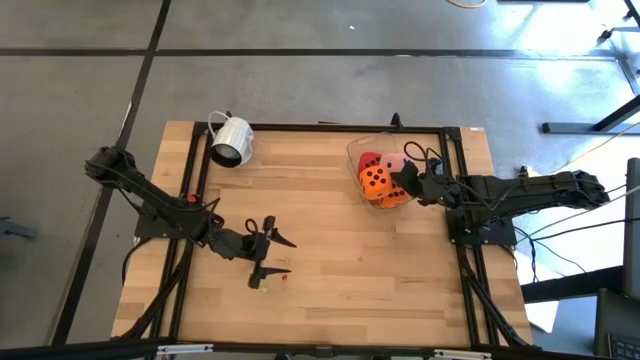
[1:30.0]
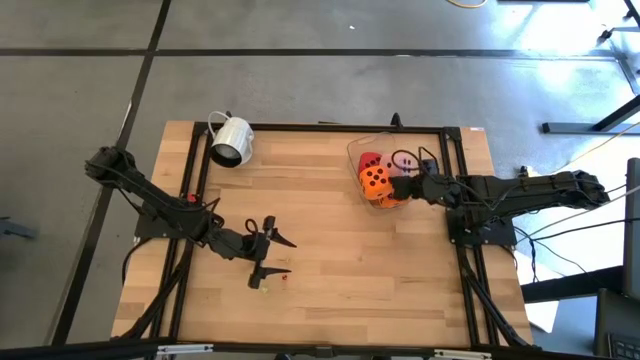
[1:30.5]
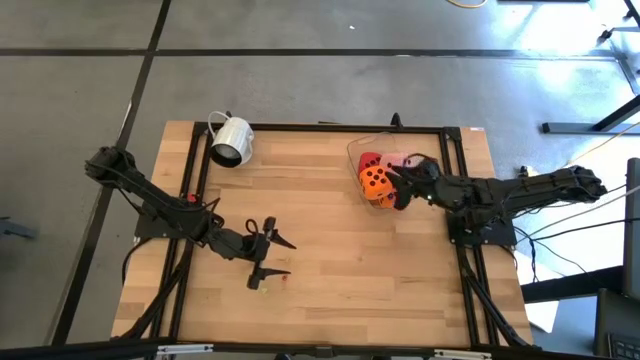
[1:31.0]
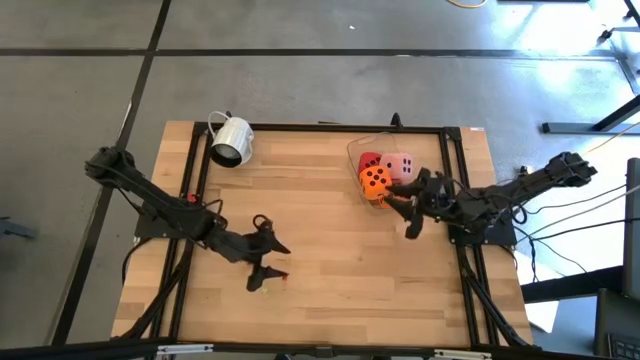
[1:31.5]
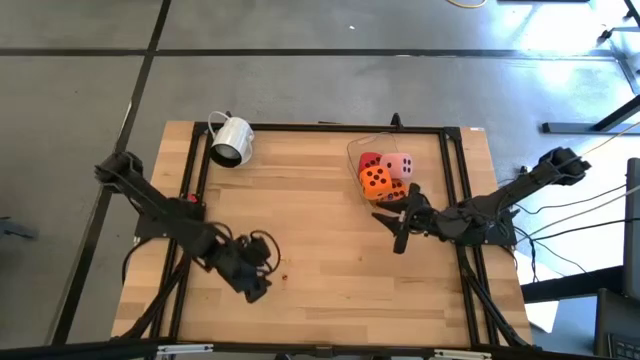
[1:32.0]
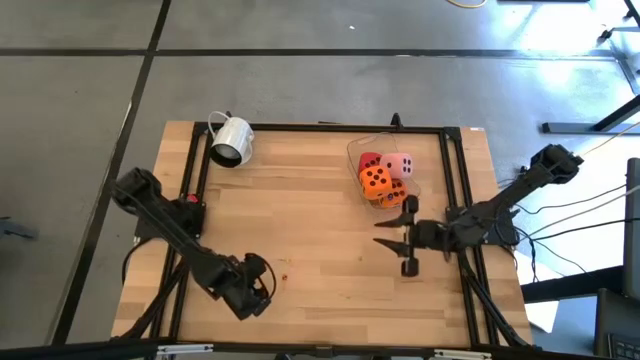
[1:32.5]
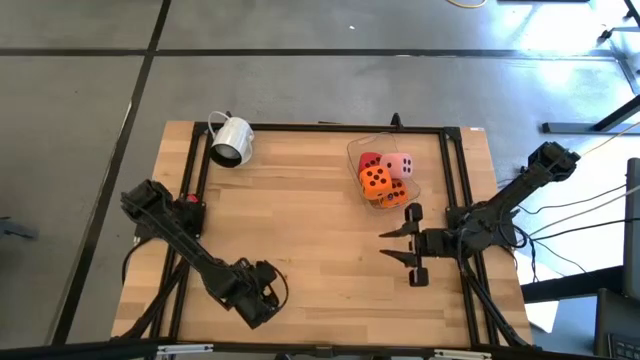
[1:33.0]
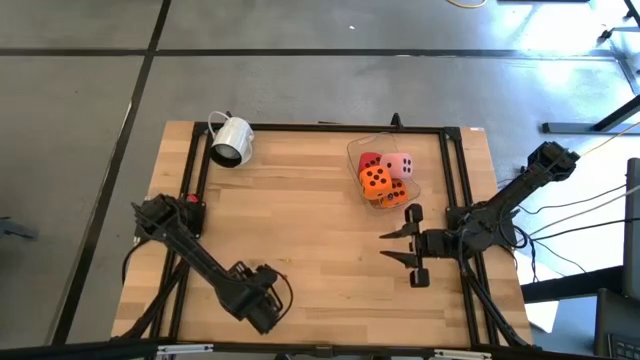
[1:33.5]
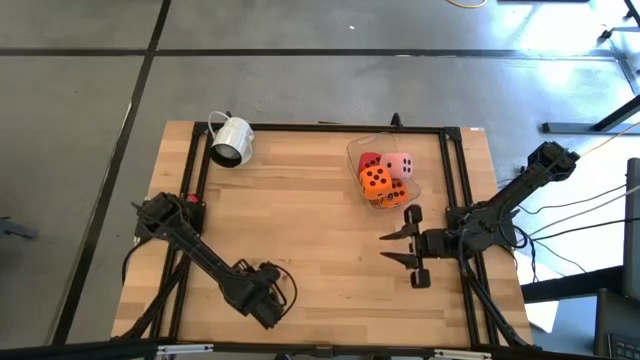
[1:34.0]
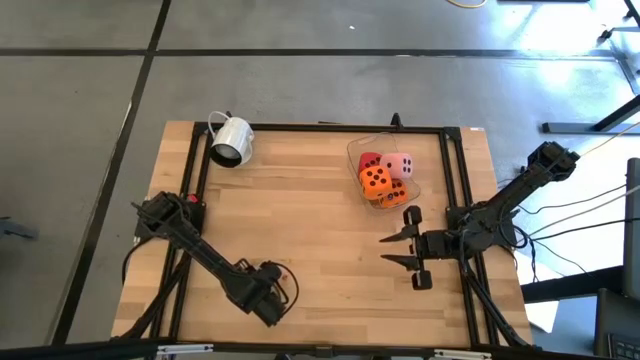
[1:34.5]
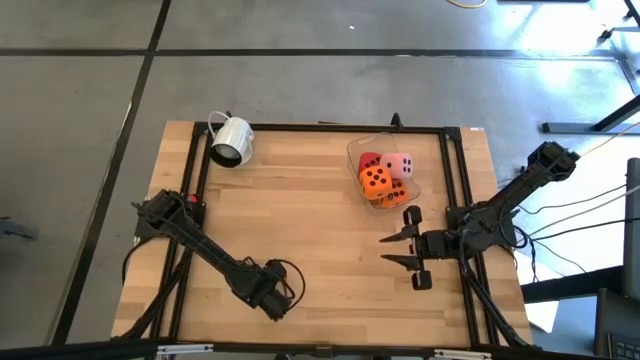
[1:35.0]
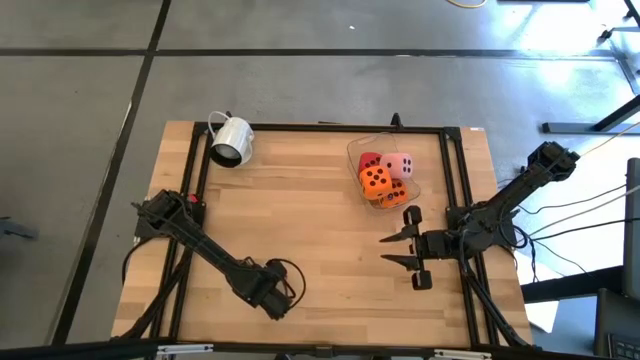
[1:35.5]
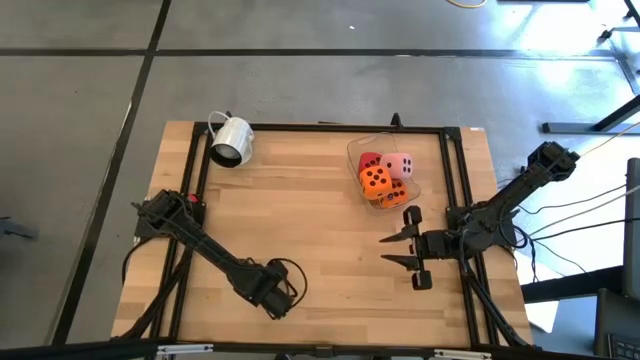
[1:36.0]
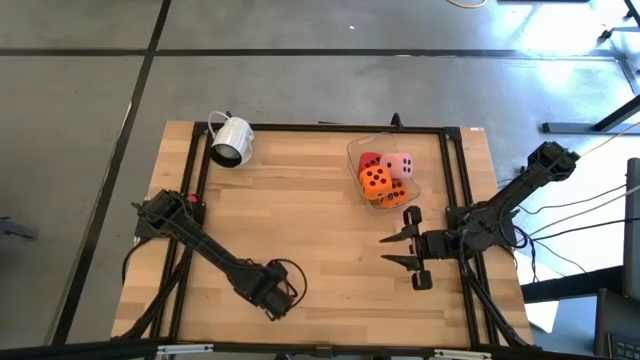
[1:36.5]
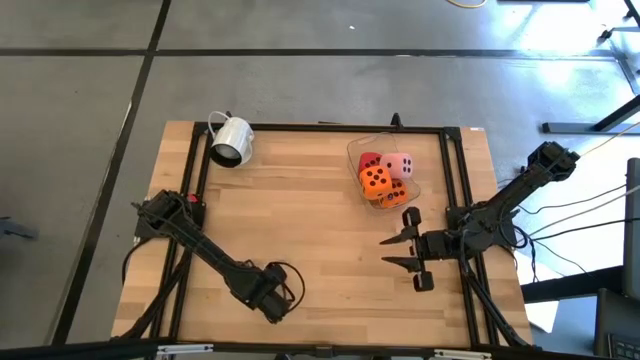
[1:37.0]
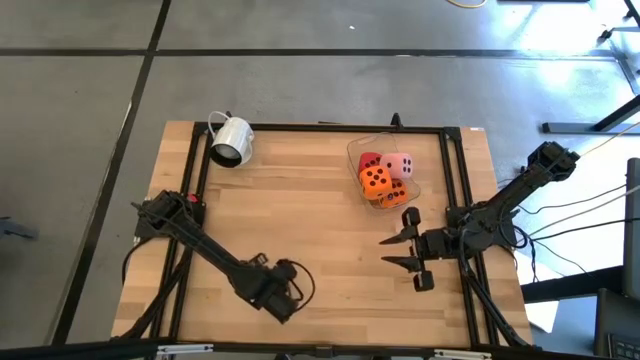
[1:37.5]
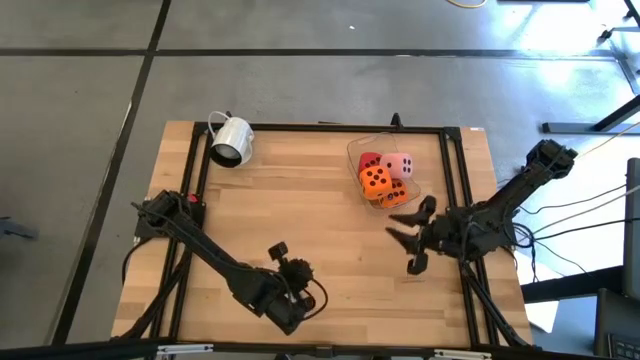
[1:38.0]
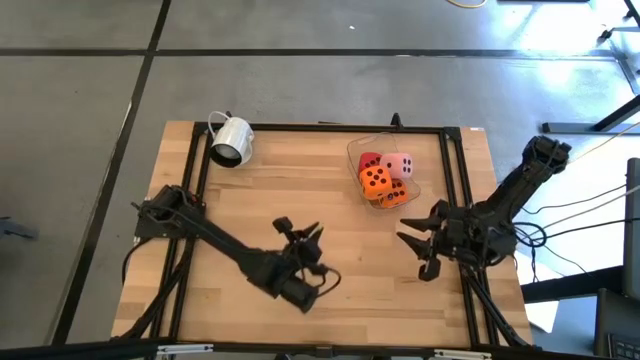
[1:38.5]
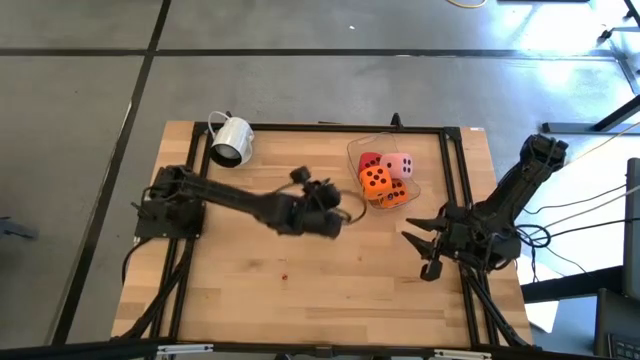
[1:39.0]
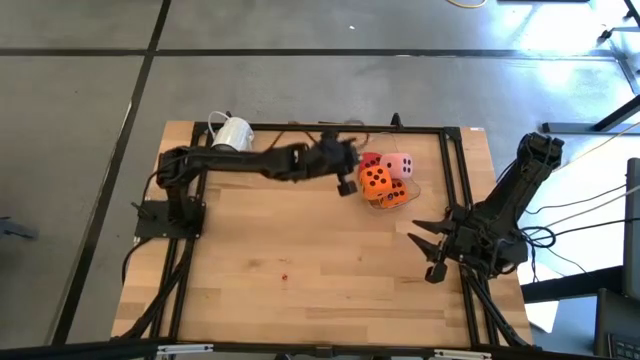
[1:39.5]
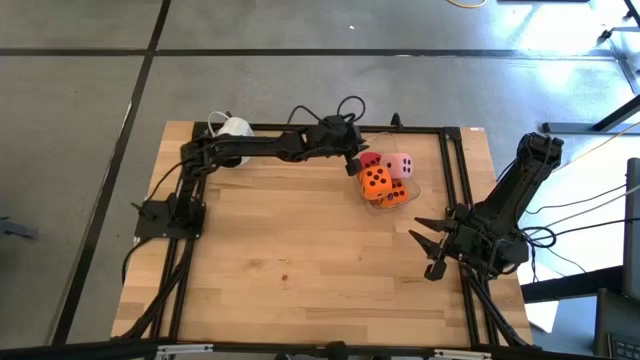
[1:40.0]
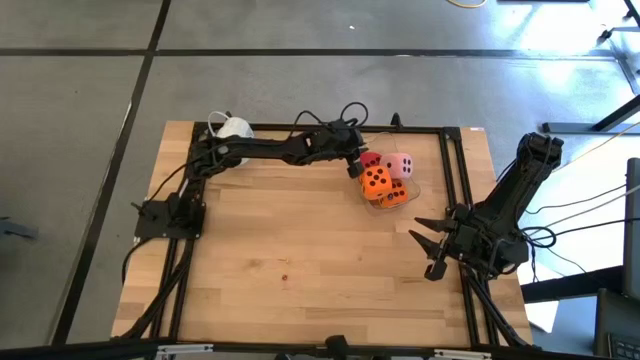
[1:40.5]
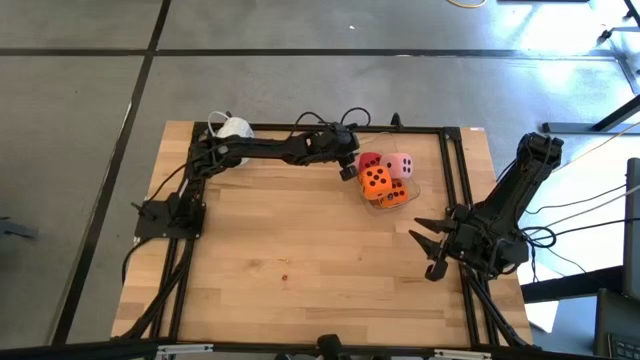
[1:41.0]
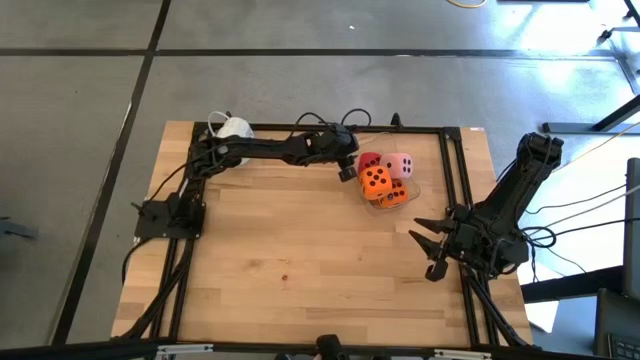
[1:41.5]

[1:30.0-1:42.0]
Task: Pick & Place Dice
Put the small green die in the bin

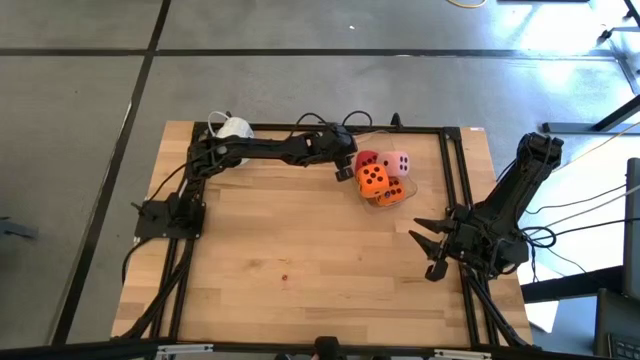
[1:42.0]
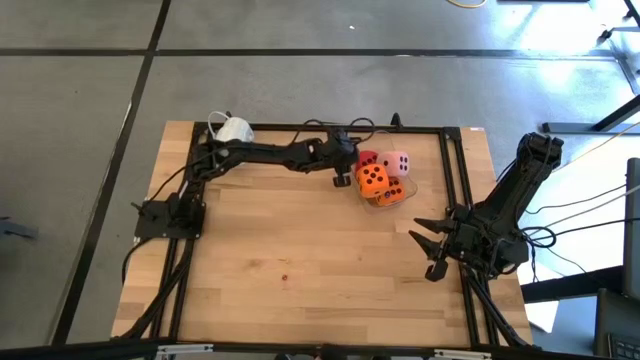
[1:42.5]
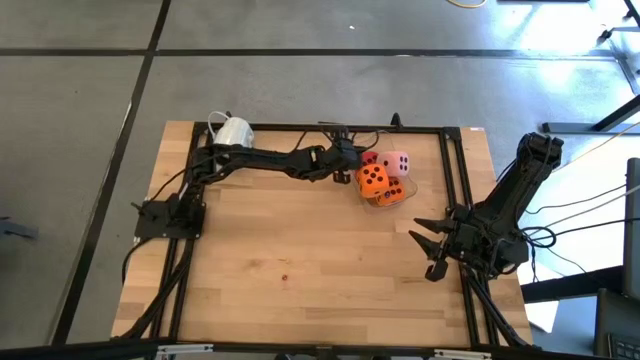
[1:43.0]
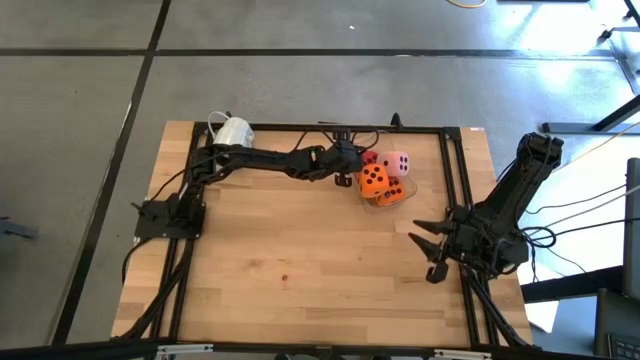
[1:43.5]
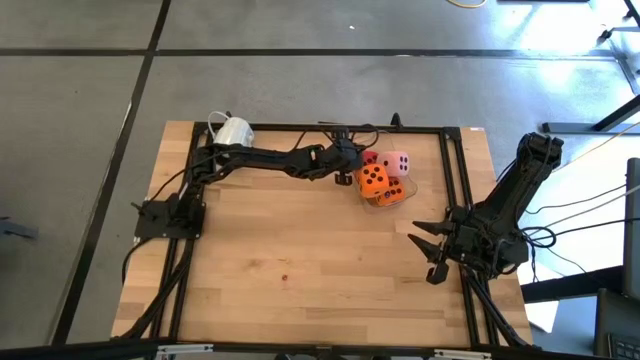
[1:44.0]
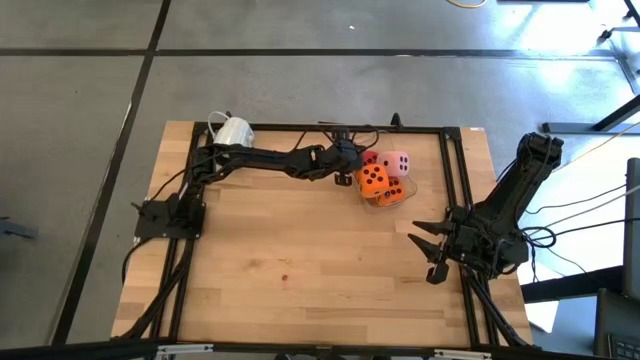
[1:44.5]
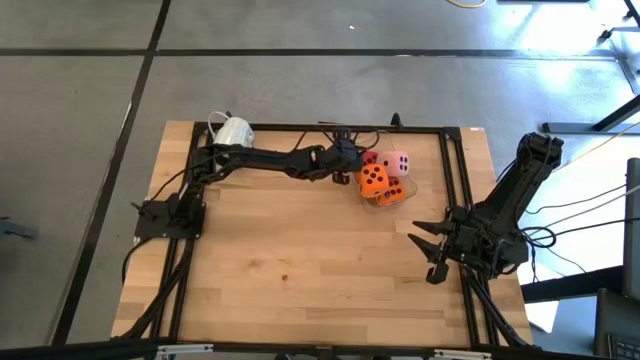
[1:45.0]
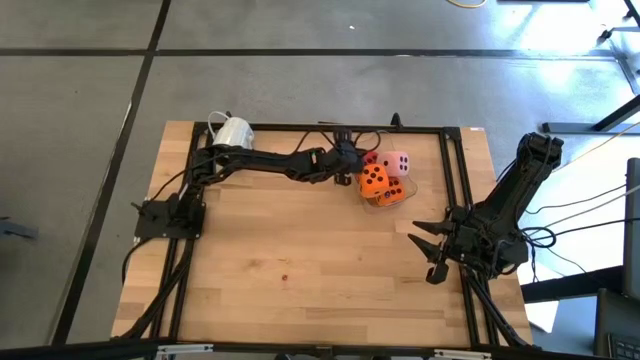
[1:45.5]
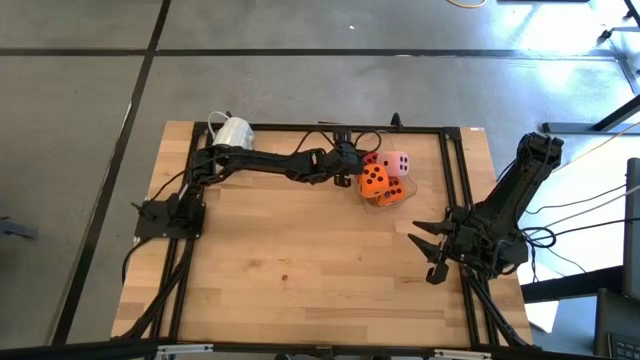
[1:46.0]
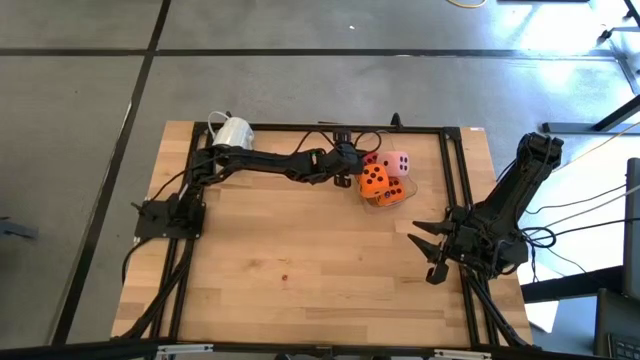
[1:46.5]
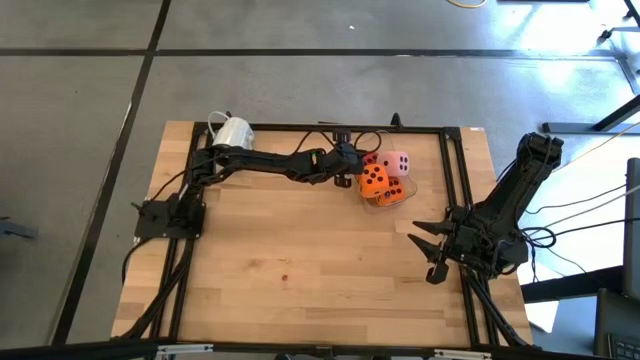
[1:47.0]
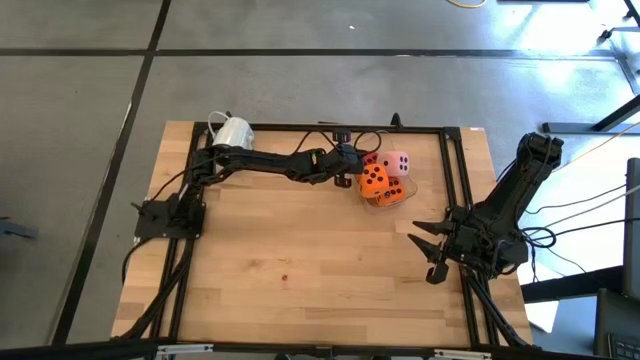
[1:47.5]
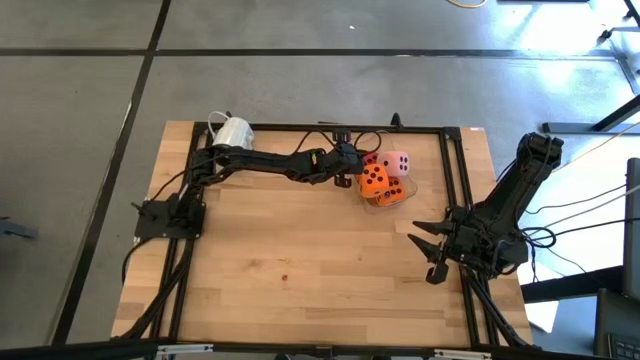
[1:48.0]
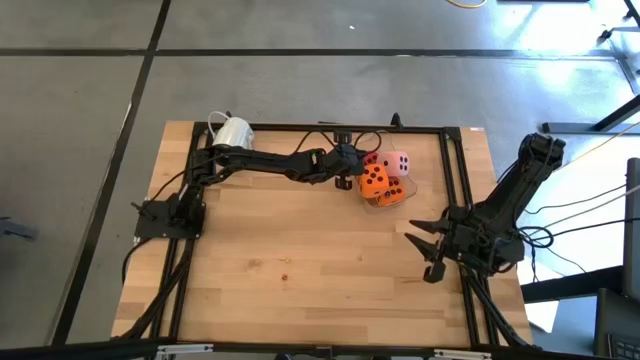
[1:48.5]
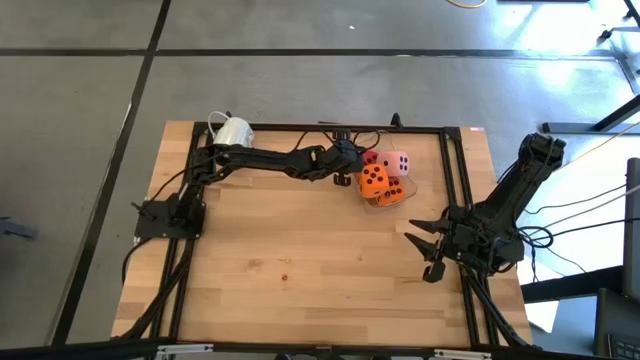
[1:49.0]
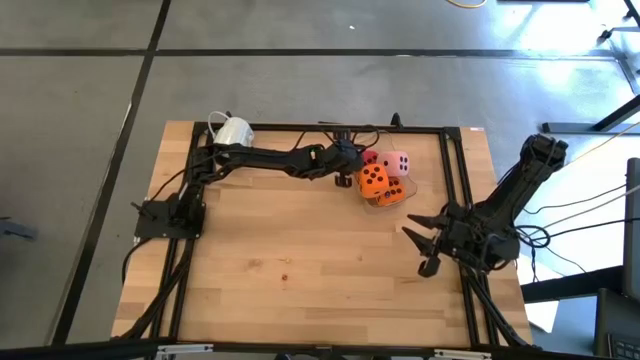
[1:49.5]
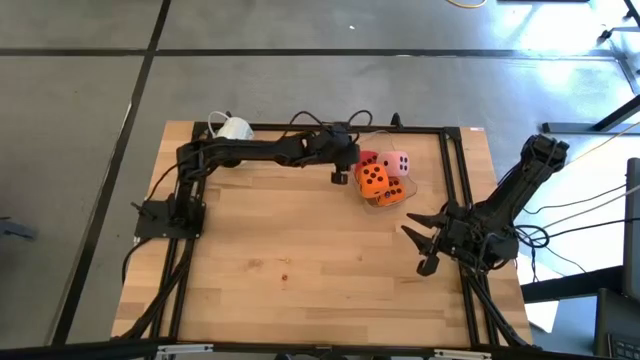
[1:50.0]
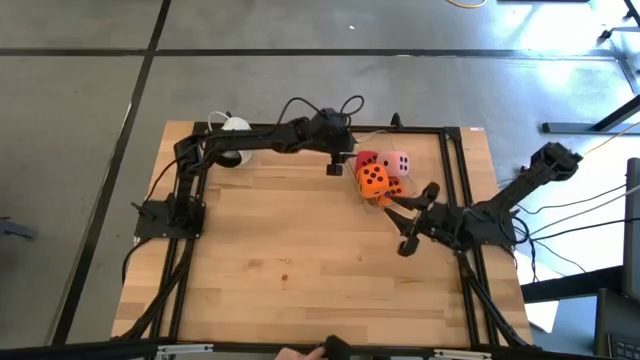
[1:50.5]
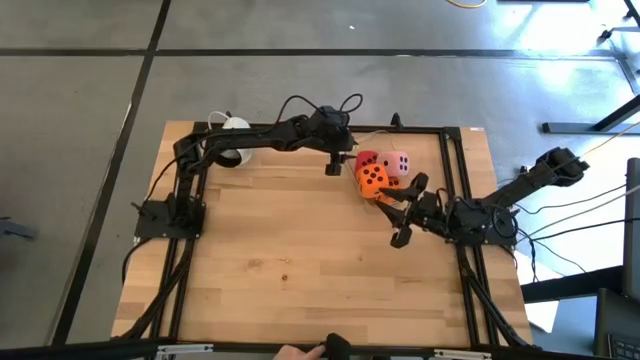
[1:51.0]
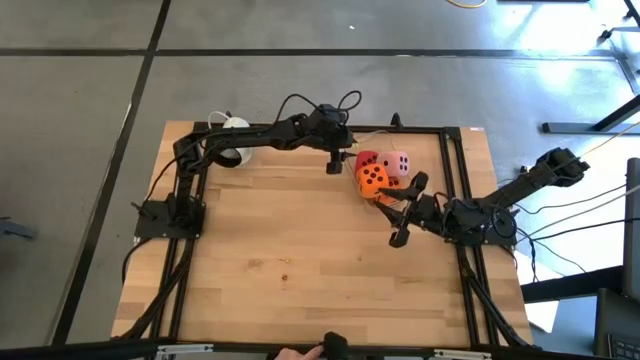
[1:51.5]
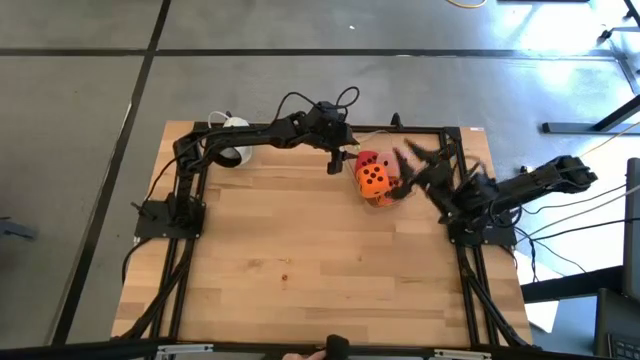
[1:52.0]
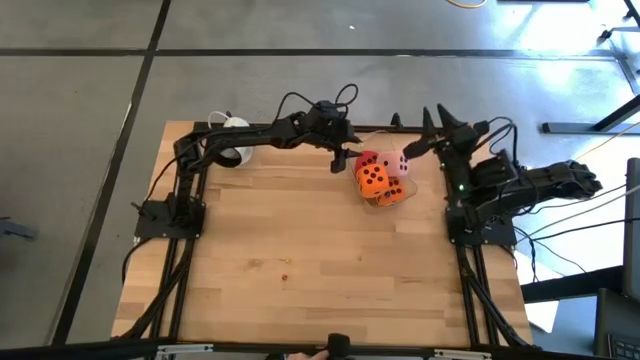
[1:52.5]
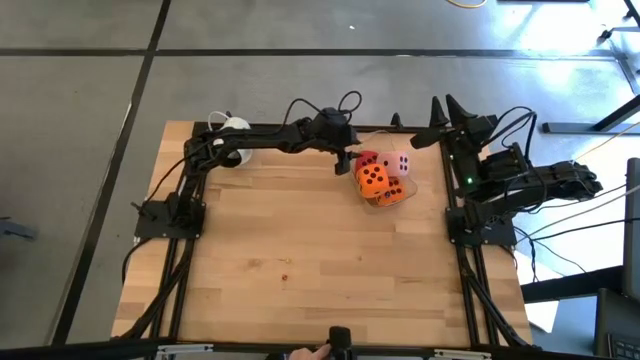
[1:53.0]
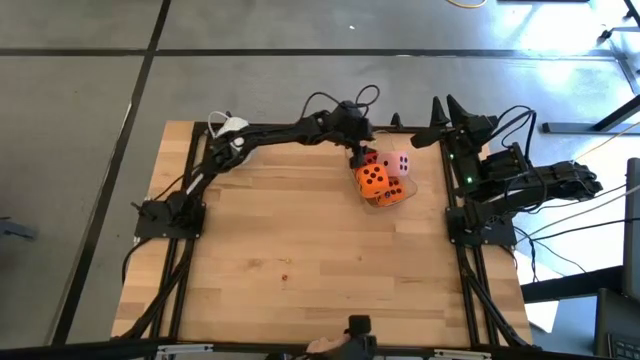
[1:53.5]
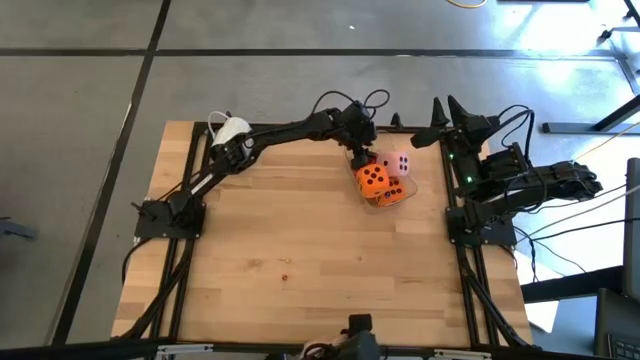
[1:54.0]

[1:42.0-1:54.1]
Put the small green die in the bin
